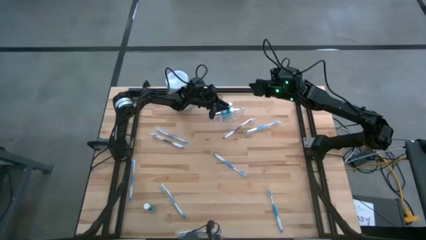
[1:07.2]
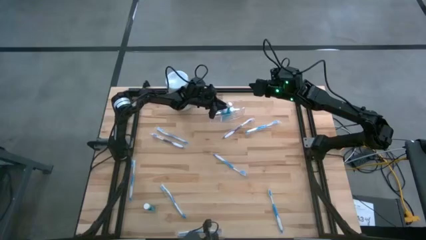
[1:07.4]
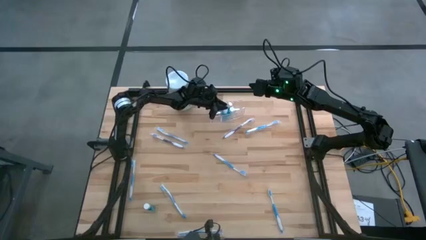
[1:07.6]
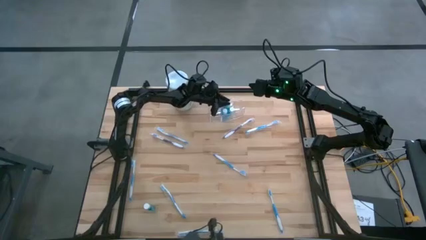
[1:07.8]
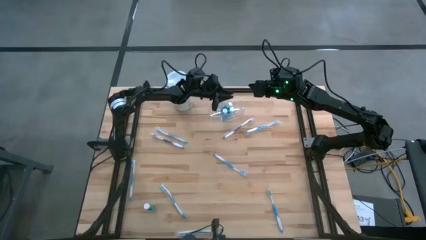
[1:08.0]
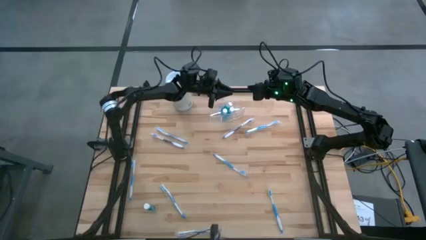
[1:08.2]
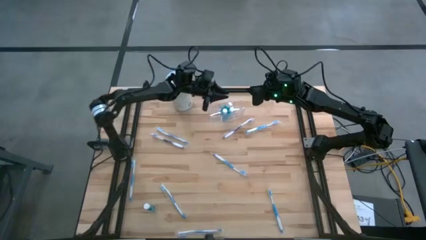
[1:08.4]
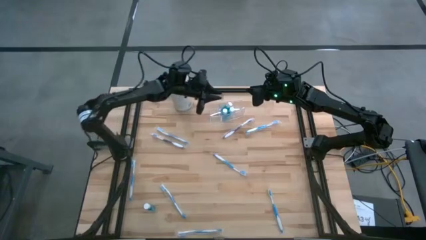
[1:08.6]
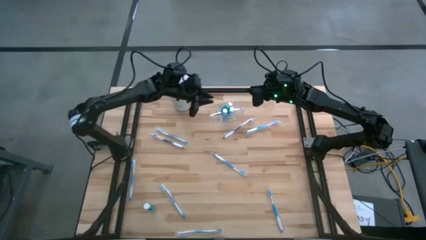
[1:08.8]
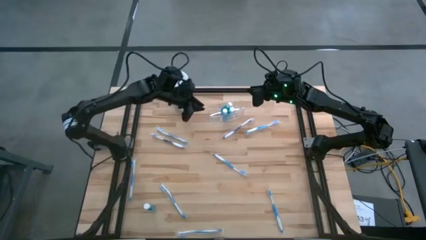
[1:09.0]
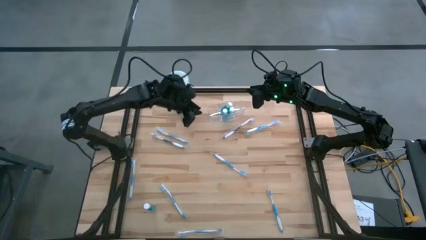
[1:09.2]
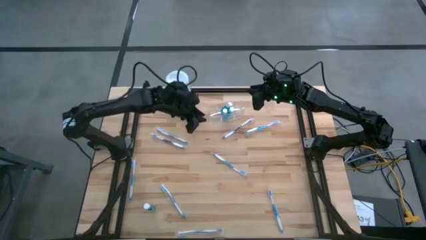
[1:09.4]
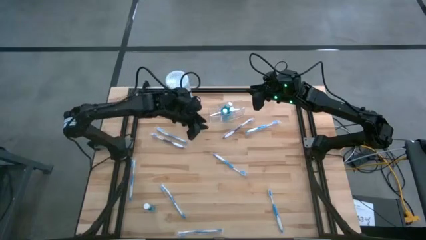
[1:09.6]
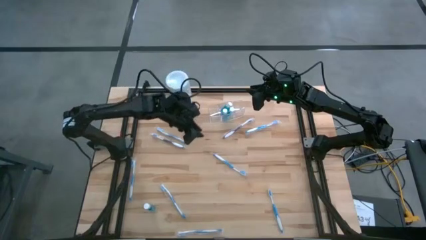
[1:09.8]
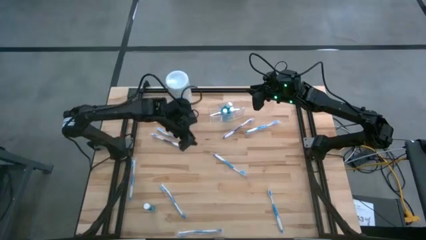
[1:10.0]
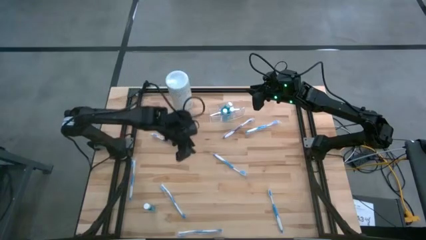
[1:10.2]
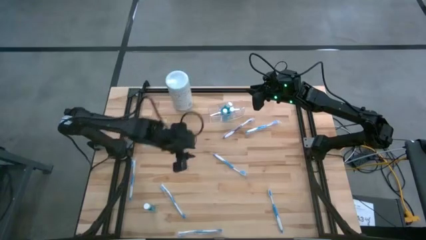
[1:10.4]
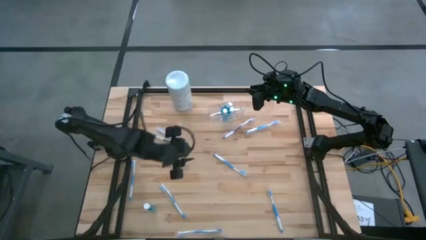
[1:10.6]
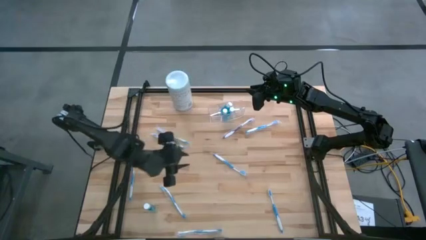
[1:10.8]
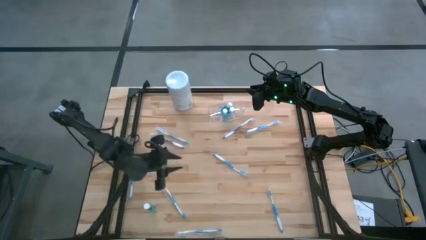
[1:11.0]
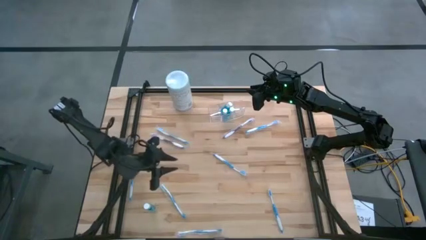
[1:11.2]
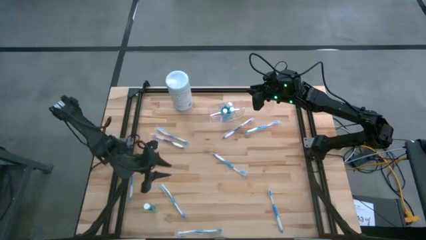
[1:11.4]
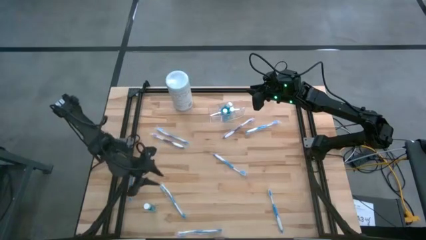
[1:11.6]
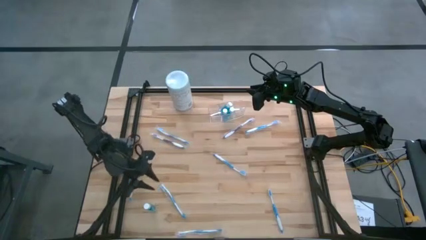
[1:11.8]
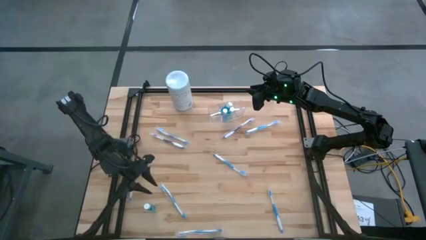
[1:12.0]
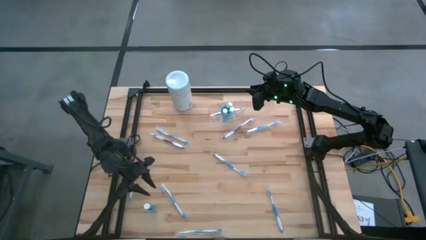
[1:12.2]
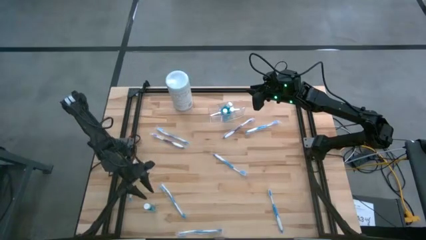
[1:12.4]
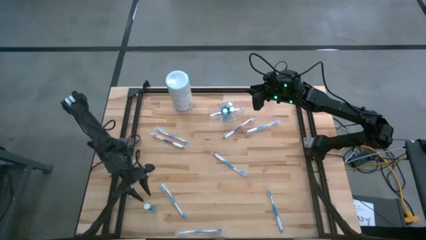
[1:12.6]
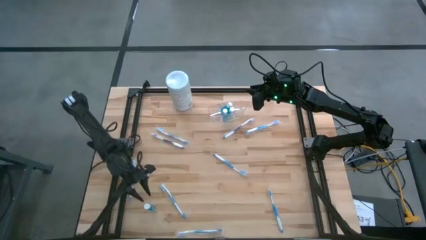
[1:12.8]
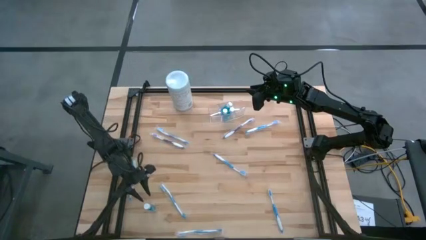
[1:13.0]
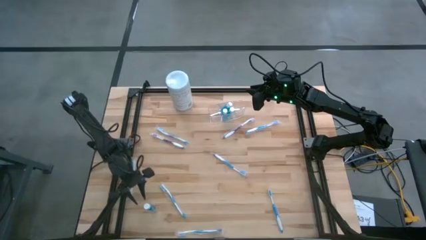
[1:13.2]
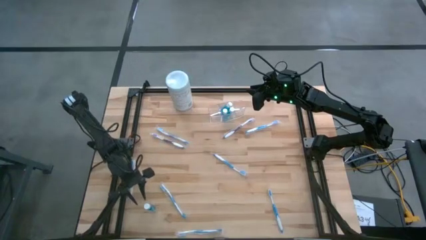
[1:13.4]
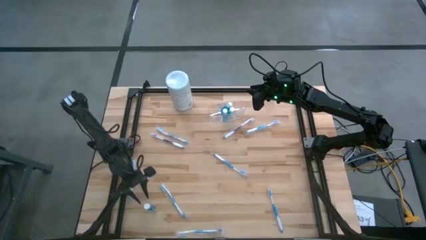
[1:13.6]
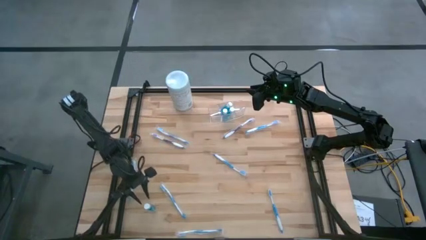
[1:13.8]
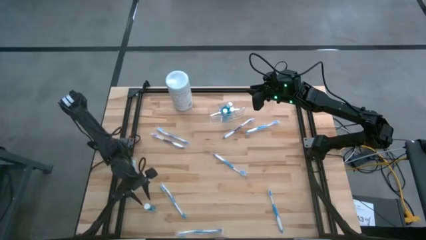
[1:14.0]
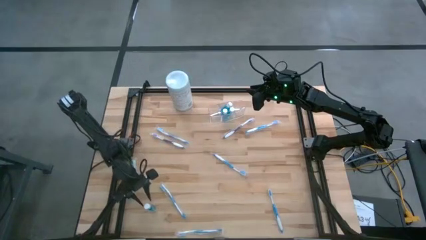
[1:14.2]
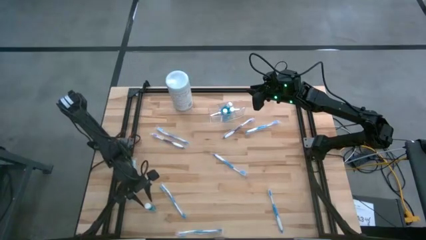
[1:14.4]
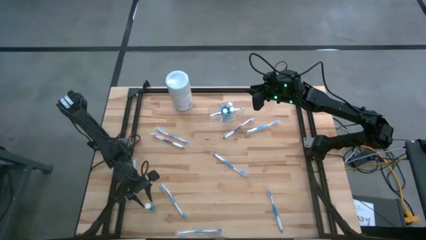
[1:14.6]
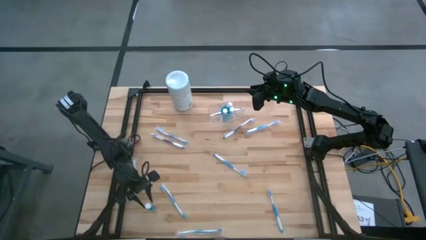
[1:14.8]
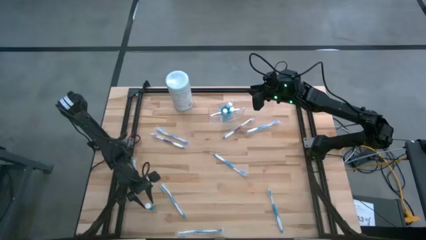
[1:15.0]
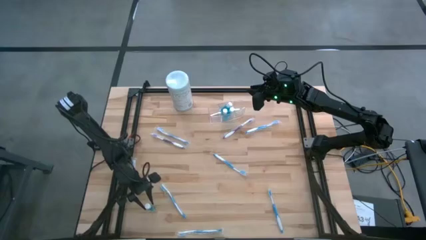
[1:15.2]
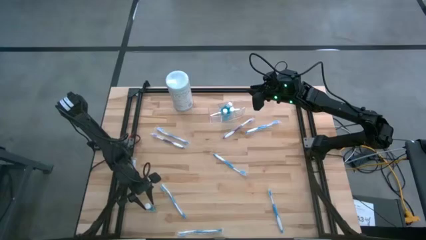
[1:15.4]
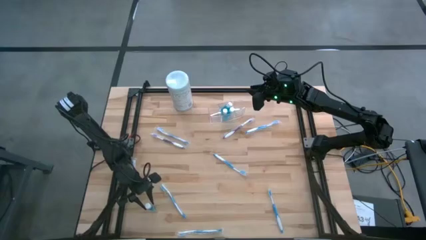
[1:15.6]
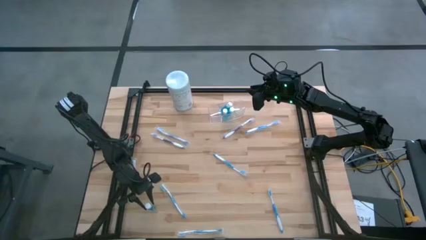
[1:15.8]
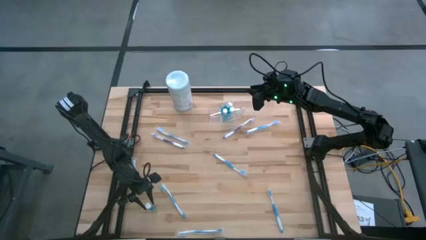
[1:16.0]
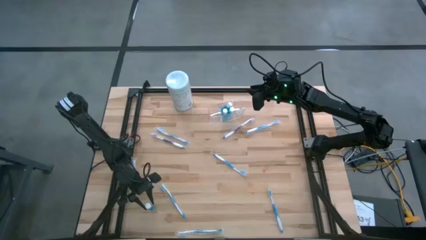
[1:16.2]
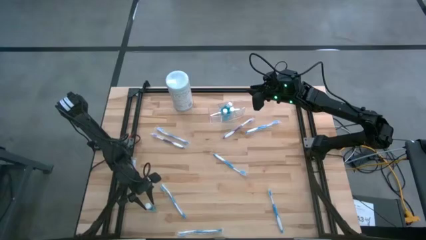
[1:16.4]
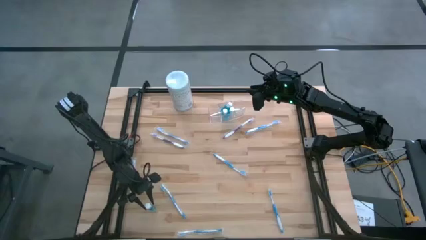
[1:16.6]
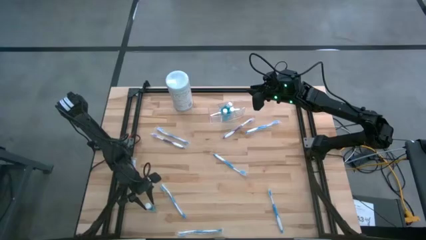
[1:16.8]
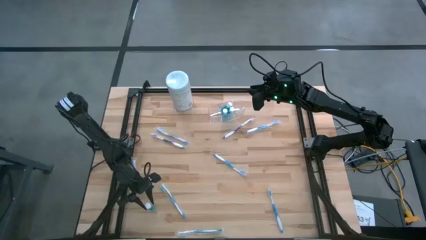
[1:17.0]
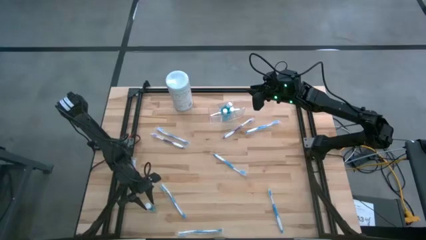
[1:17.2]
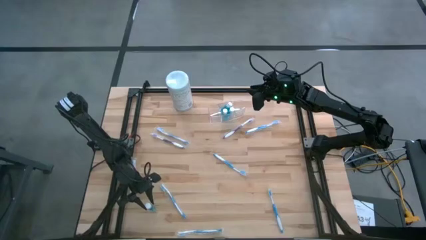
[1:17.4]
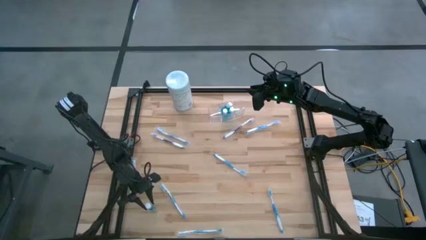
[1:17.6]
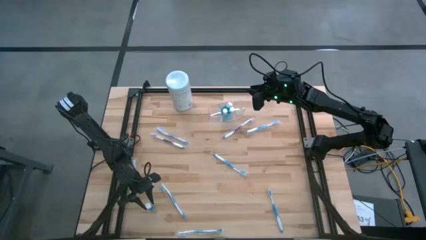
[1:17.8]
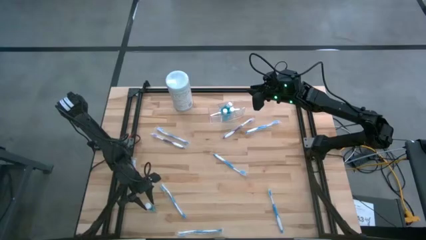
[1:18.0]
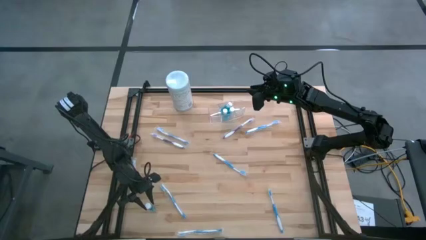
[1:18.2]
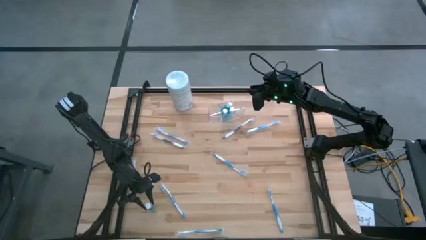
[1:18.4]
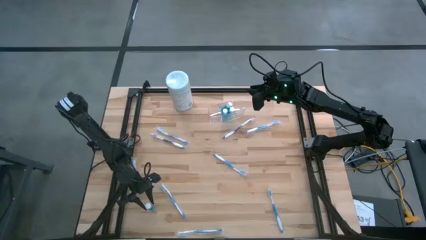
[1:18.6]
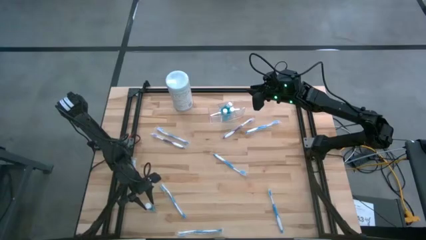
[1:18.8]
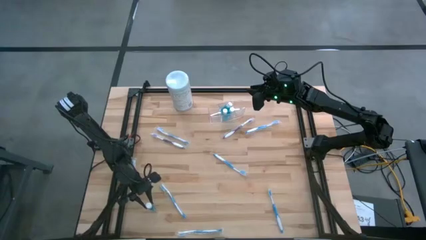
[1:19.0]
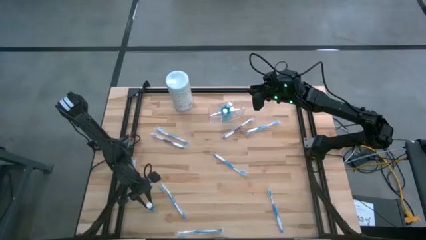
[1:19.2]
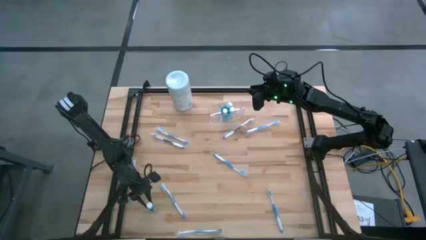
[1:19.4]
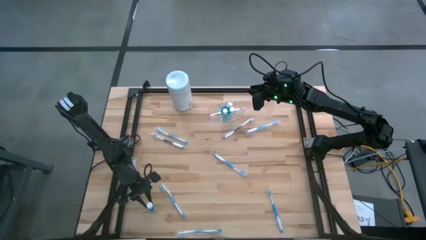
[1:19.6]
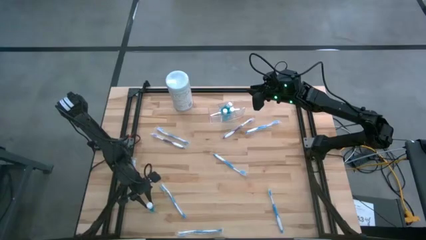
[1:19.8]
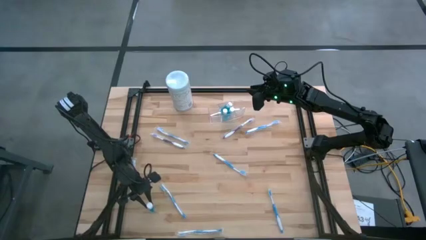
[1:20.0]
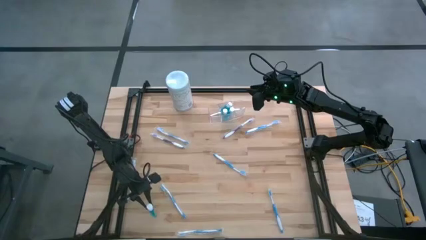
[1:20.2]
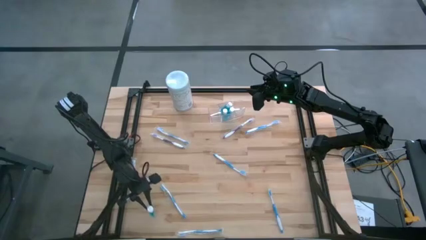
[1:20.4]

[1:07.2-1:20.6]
Task: Pick & Place toothbrushing station
Put the blue mouthwash into the middle of the transparent organizer

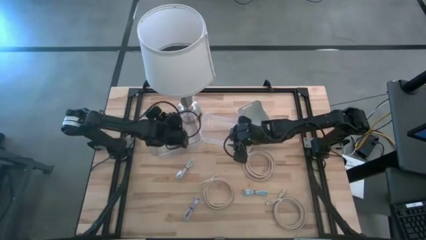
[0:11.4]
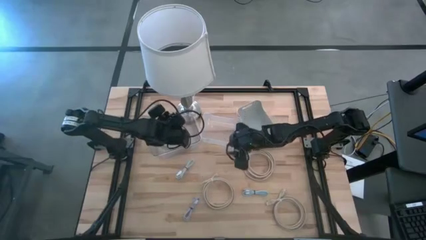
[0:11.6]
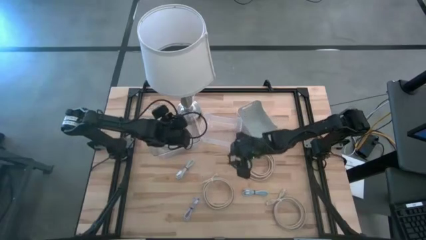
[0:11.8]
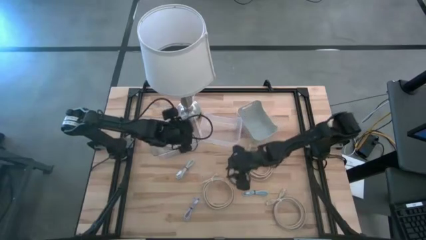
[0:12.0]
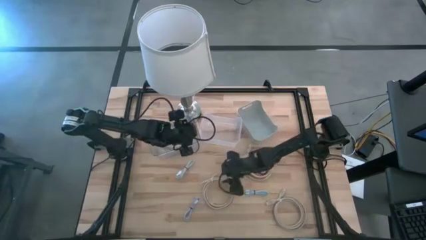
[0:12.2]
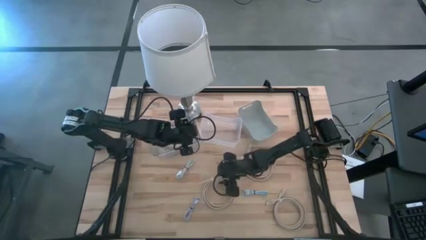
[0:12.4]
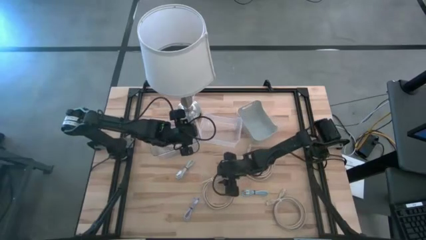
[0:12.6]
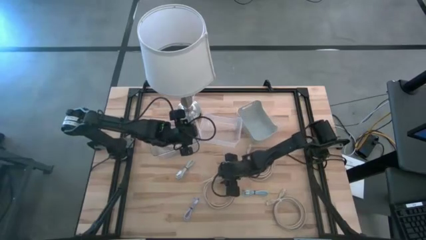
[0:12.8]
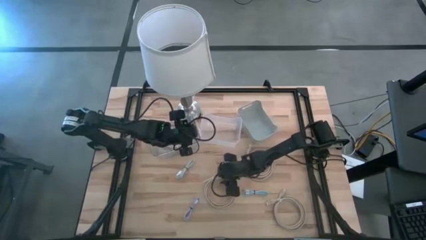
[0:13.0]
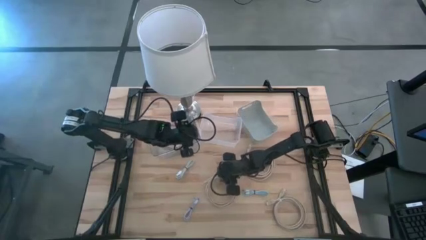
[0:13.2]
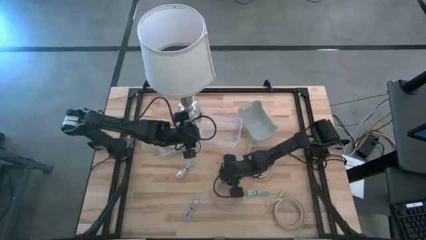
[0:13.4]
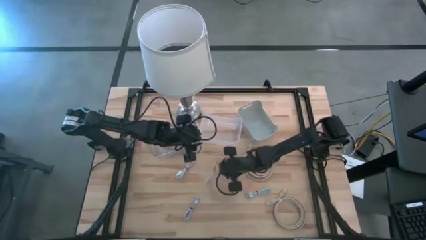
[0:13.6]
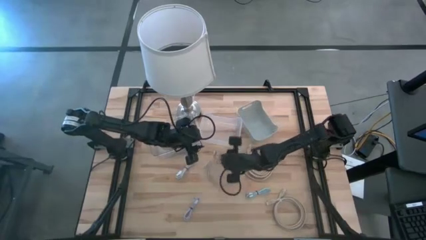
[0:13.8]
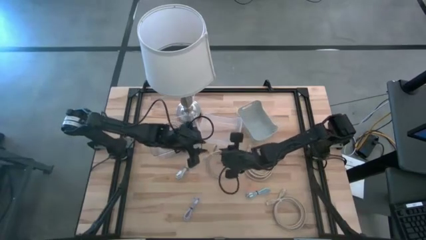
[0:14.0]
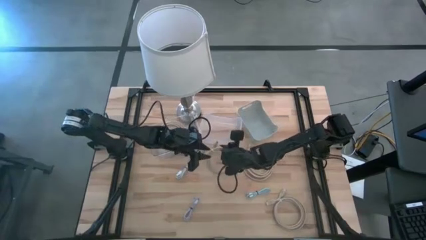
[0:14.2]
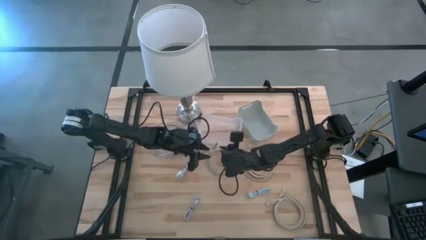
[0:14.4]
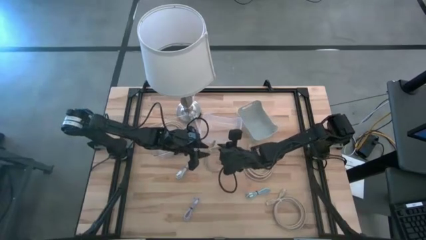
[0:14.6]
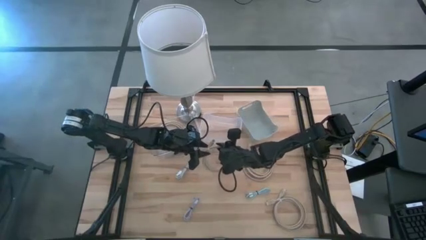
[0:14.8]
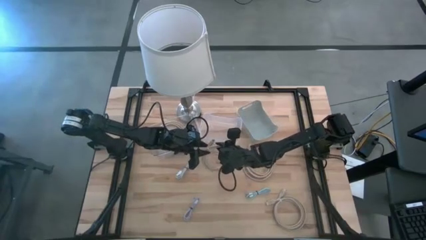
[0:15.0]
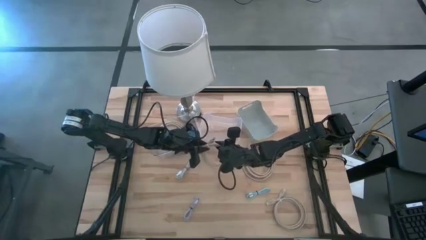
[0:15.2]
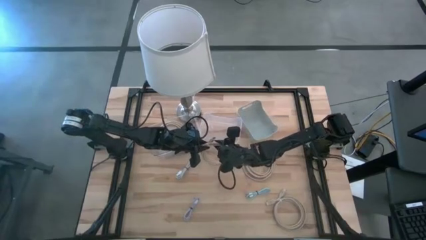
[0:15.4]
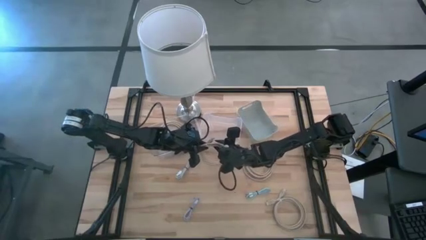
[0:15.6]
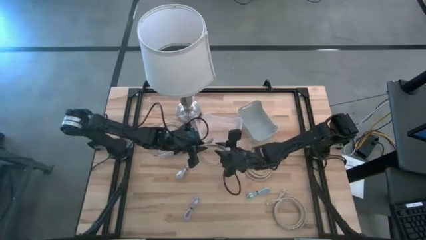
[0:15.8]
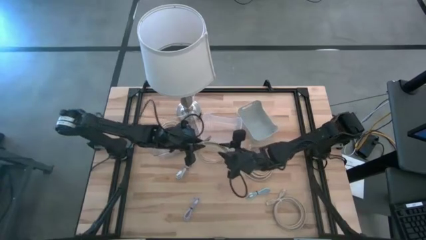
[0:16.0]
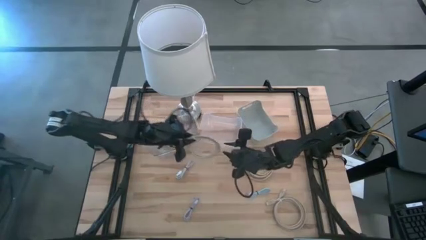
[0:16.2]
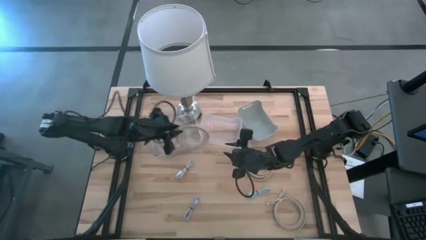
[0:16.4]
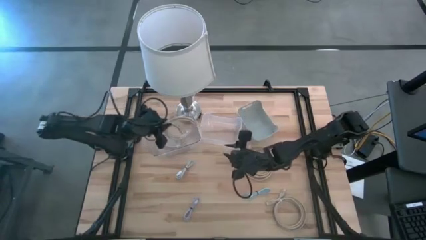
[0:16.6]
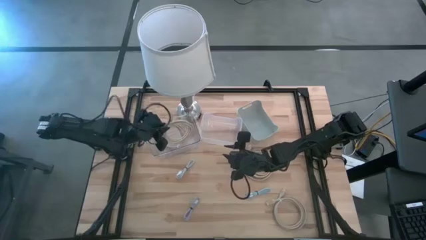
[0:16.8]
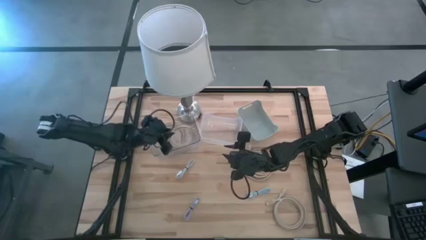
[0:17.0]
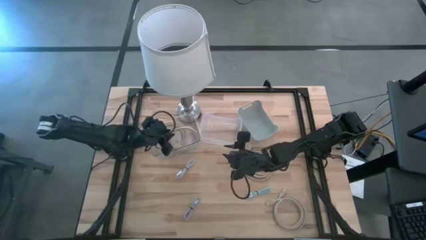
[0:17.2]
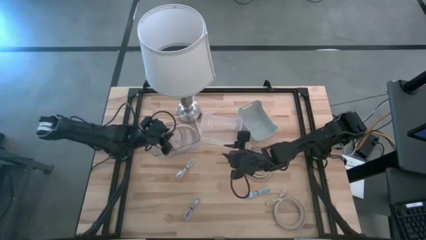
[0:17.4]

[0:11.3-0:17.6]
Task: Pick & Place USB Port
Put the brown HDMI cable into the transparent bin
